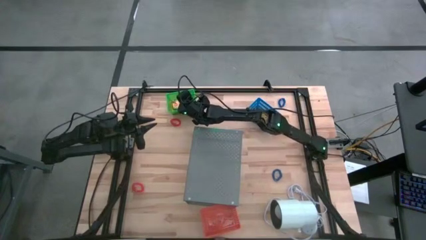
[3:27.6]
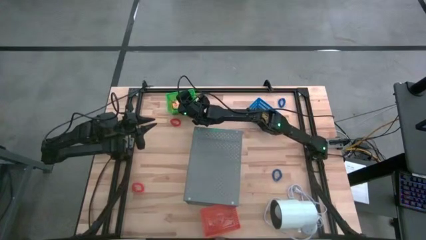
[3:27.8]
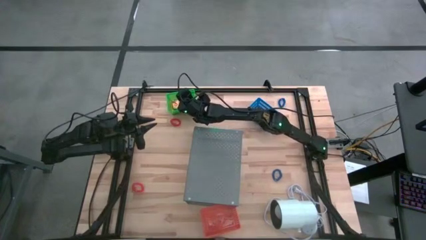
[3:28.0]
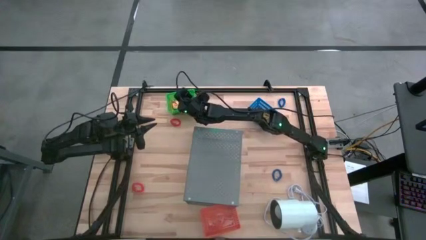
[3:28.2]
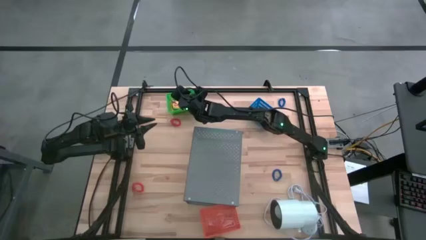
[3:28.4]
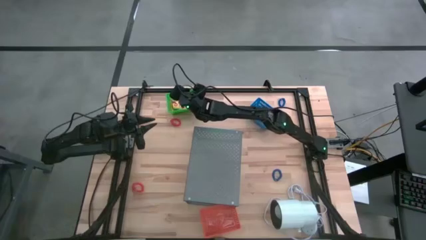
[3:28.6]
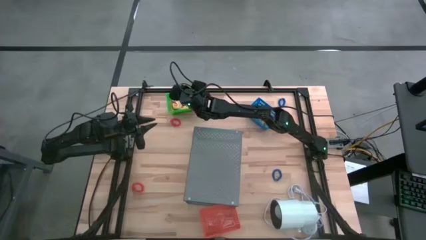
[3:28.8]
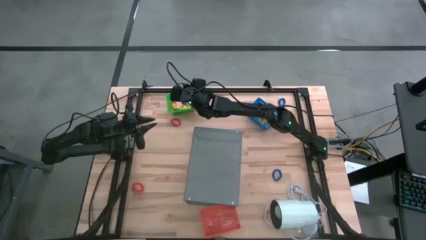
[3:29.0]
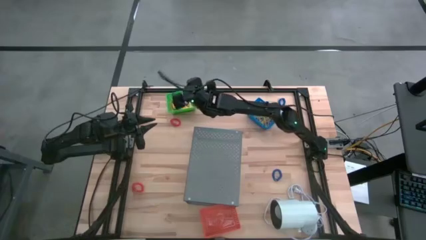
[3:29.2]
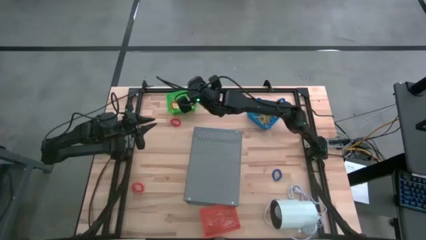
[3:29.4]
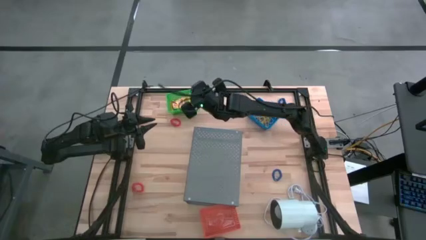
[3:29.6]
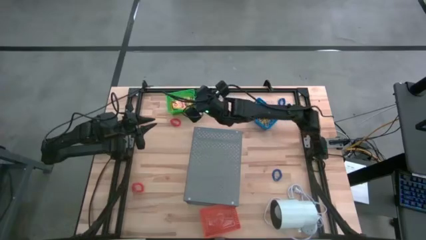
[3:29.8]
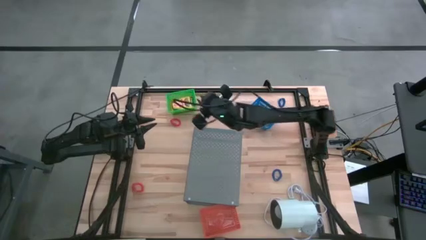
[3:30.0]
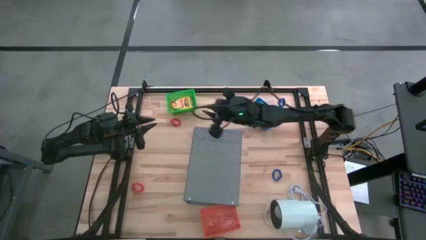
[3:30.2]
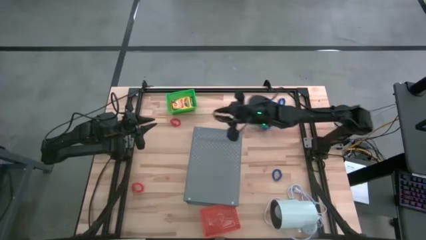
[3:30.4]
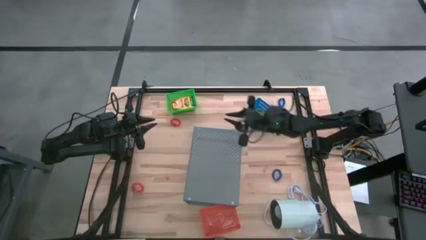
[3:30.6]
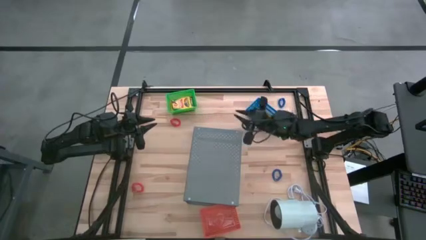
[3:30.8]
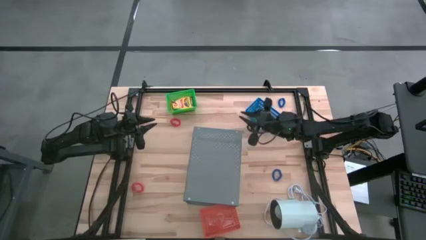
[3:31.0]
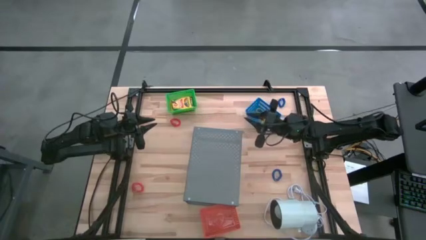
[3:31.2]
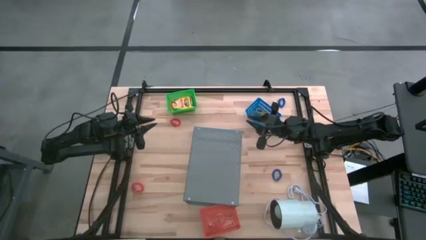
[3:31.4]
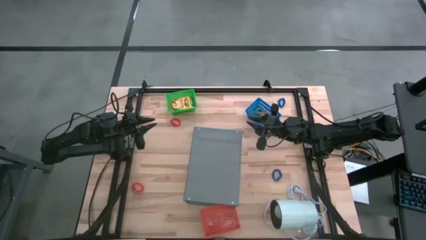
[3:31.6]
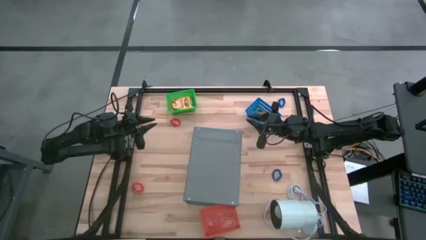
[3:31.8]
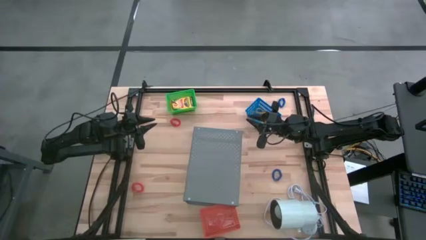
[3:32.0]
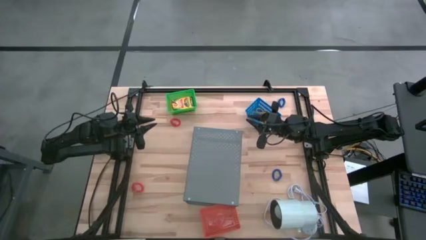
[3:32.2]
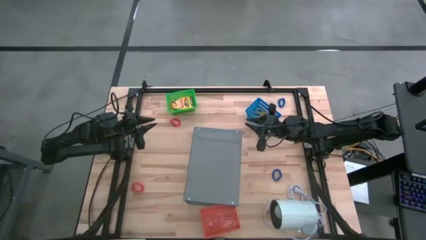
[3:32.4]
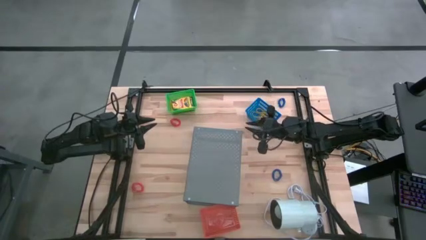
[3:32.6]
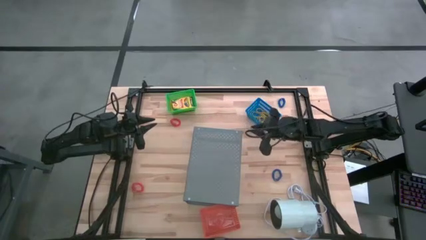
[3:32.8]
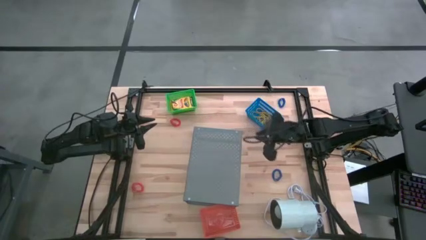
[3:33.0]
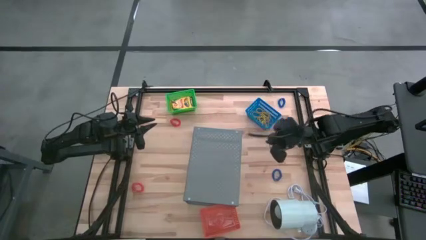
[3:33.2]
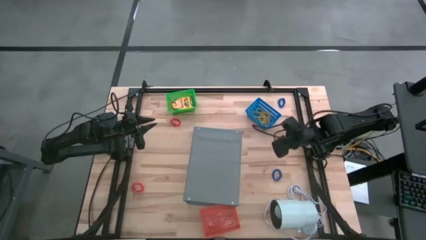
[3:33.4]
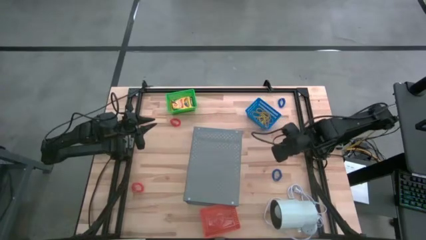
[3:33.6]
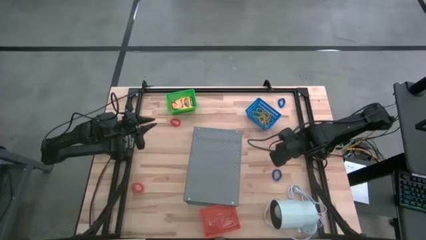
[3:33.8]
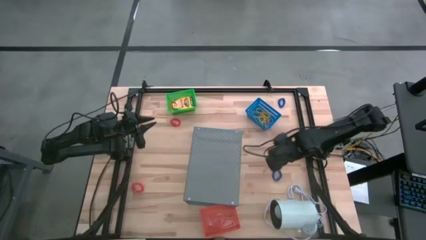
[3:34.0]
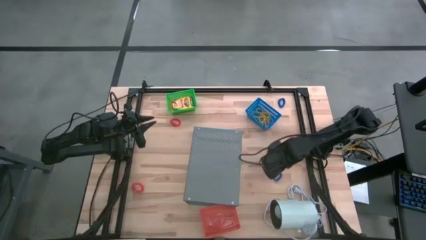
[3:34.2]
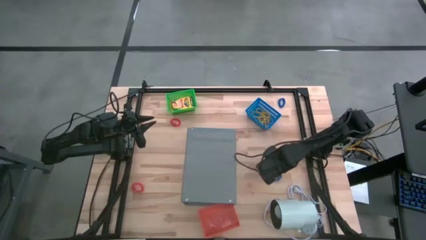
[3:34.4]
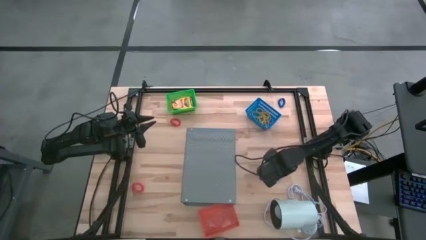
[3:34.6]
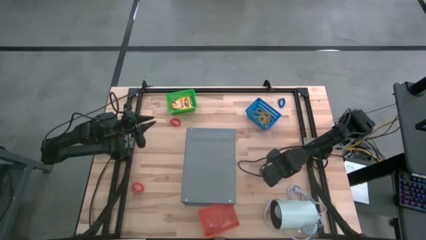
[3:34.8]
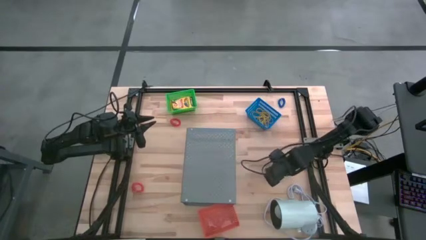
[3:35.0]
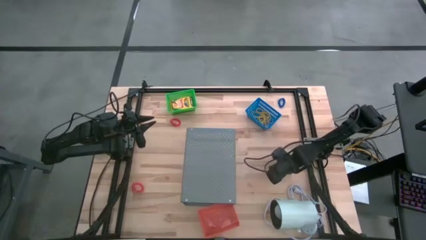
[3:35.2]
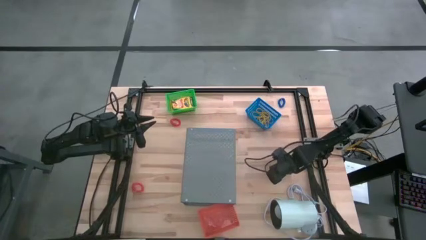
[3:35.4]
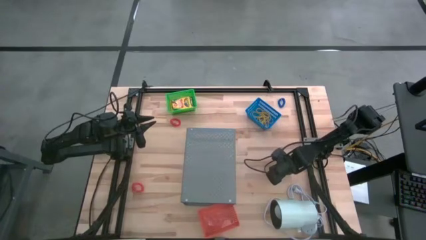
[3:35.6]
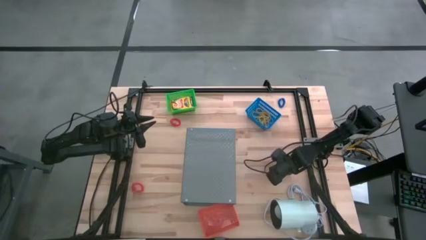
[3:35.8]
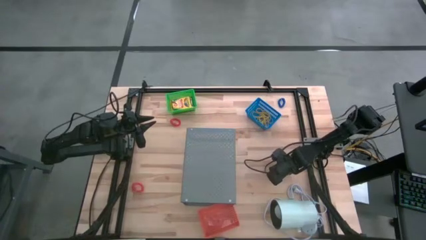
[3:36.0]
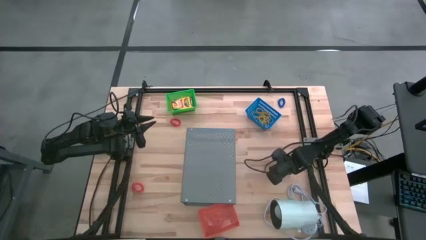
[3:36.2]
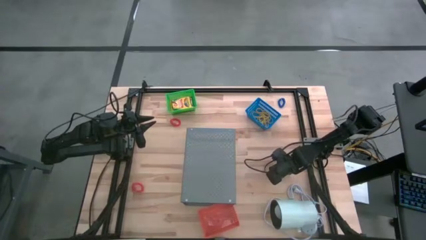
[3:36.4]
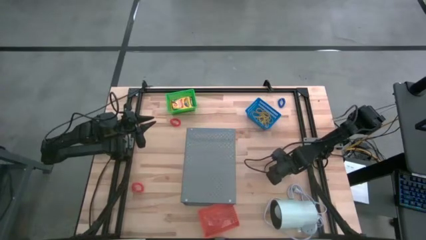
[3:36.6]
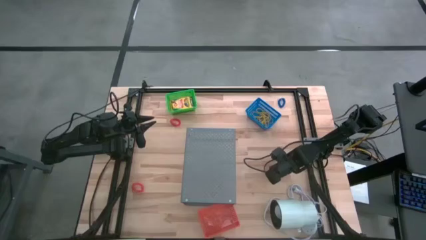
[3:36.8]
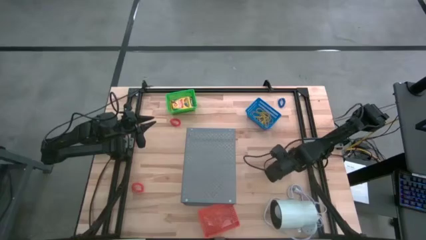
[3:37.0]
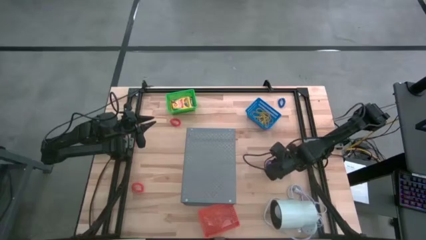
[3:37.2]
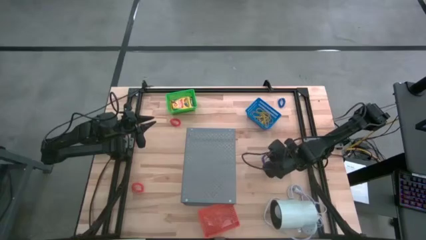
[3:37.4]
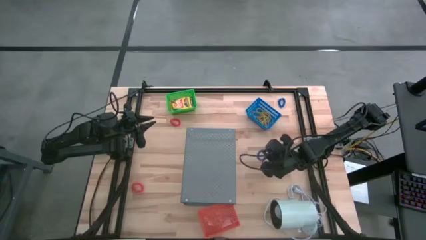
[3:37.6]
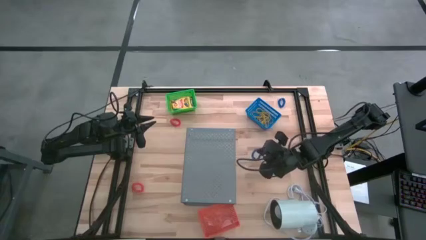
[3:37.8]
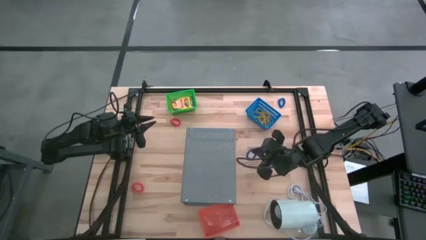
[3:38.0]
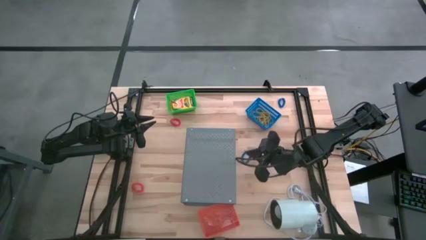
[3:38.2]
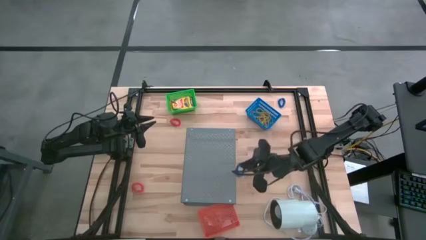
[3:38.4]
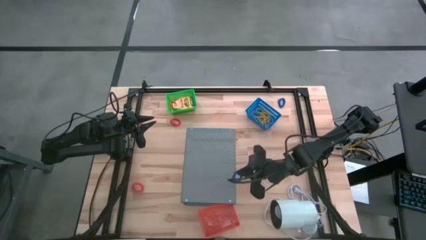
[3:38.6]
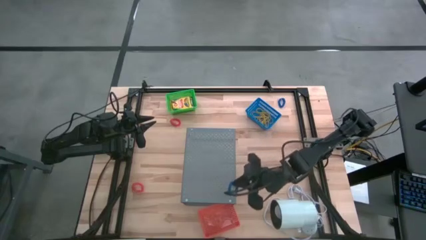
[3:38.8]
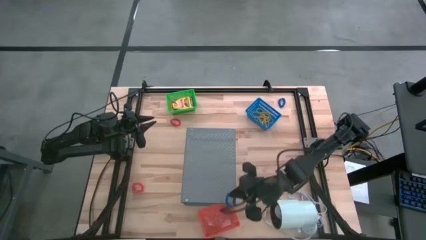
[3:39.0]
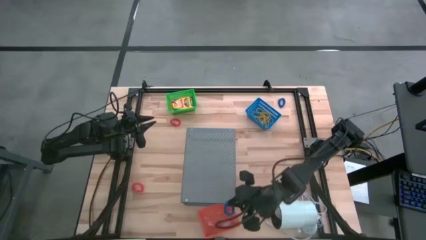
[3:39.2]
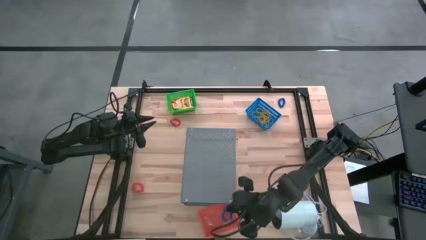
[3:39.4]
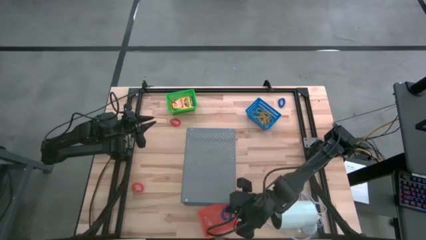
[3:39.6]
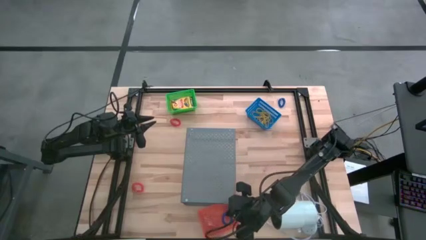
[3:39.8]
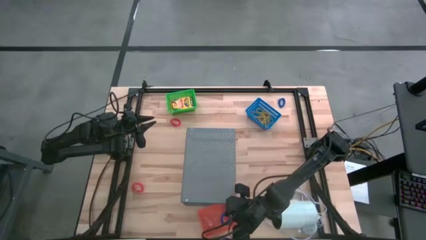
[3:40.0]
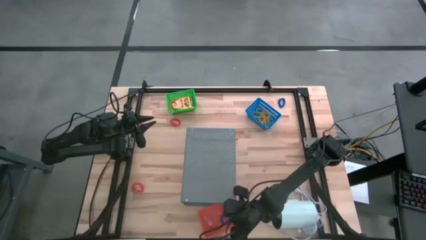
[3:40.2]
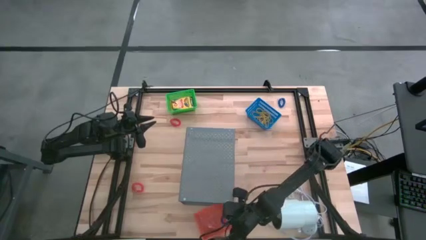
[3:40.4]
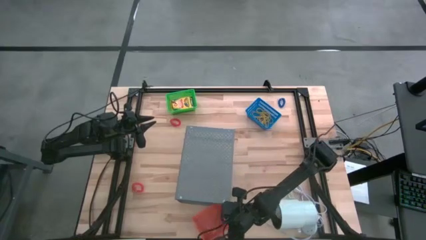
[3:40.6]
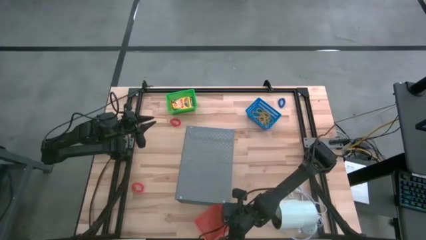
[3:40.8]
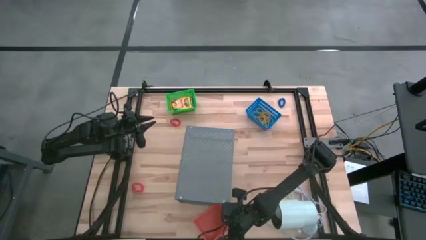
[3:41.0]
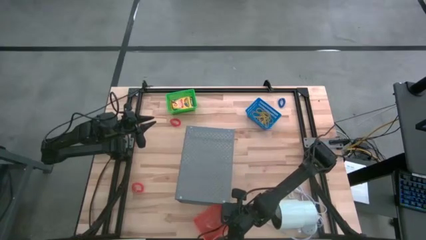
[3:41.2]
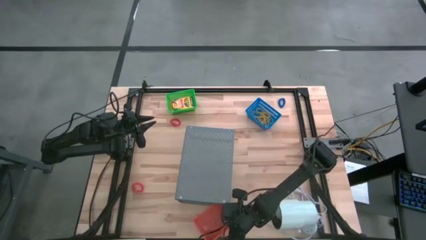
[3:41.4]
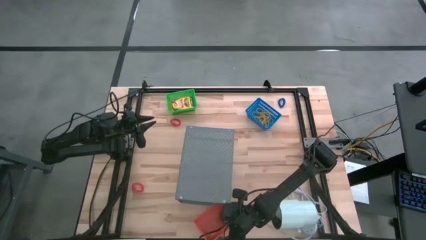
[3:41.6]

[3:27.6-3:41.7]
Task: Pick & Place Office Desk Supplies
Put the bottom blue spring keychain into the orange basket

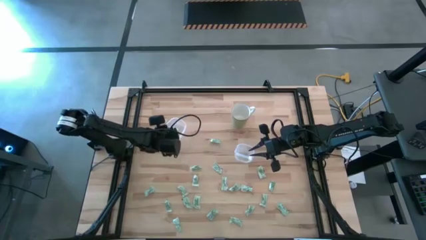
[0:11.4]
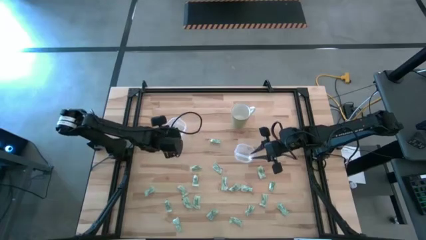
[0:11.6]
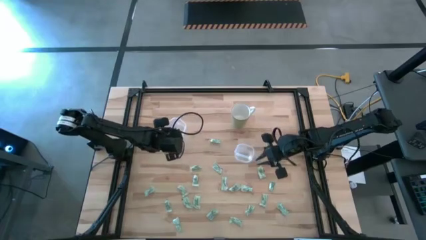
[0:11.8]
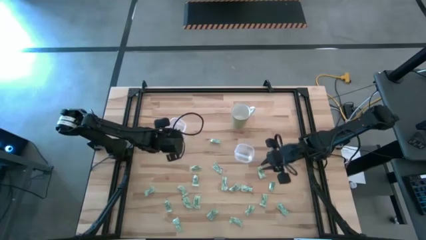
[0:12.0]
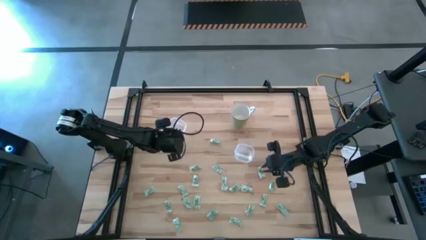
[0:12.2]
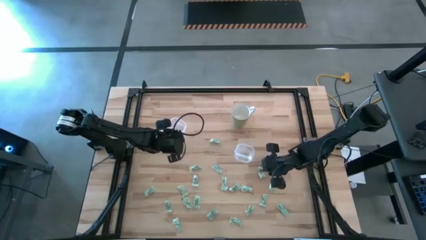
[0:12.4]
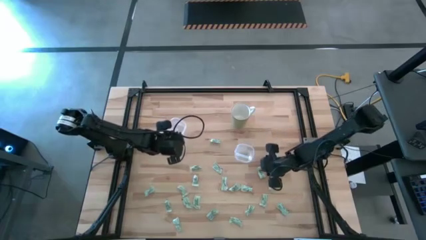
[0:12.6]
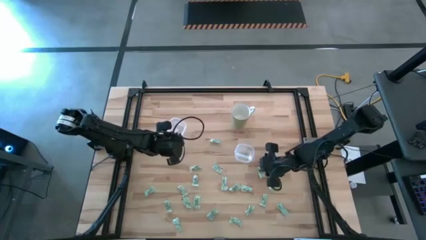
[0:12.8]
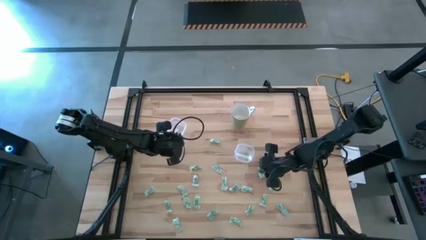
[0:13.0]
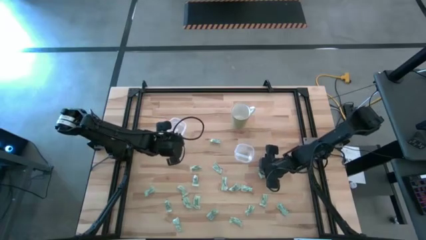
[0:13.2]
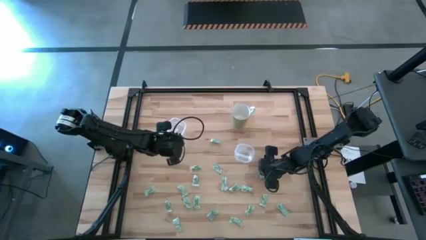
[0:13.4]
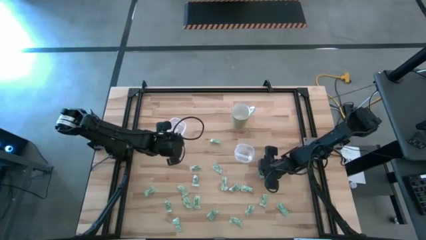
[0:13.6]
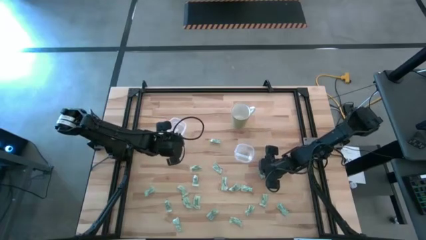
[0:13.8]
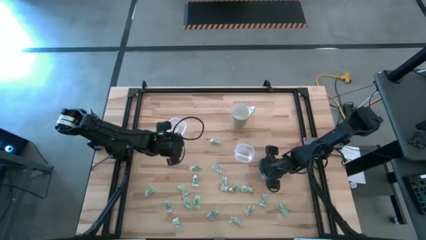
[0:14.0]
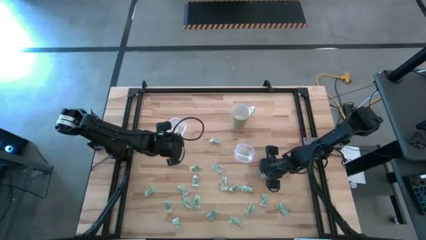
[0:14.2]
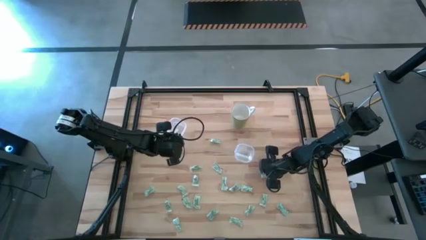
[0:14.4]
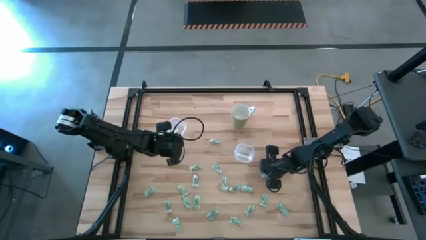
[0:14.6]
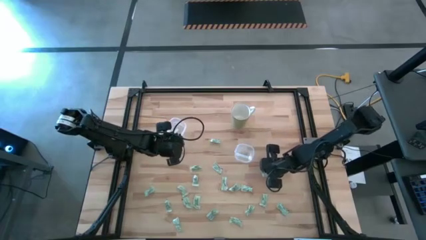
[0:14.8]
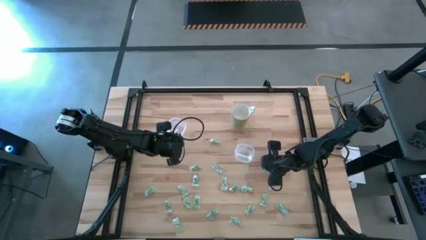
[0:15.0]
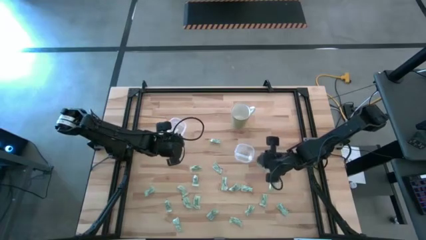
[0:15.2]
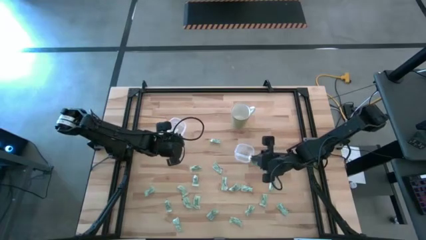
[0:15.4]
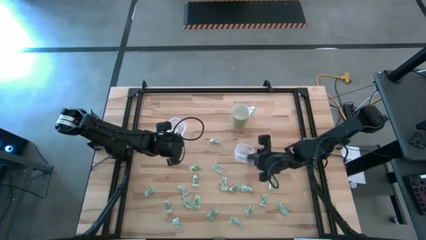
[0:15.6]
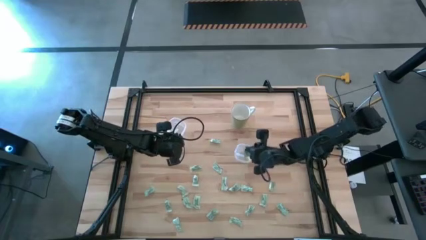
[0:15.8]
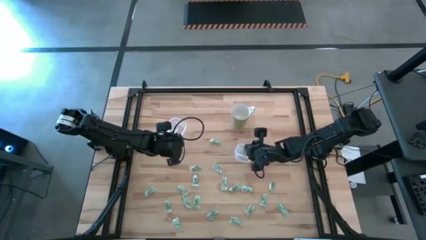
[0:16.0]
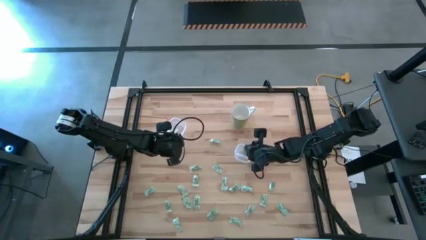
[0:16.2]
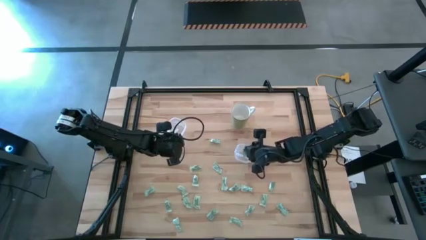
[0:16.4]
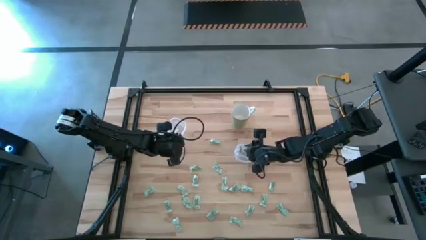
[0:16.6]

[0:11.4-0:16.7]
Task: Pick and place Stevia / Truvia into bins
Put the stevia packet into the right transparent container
